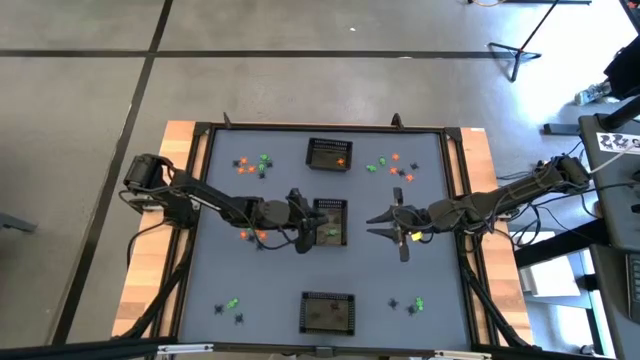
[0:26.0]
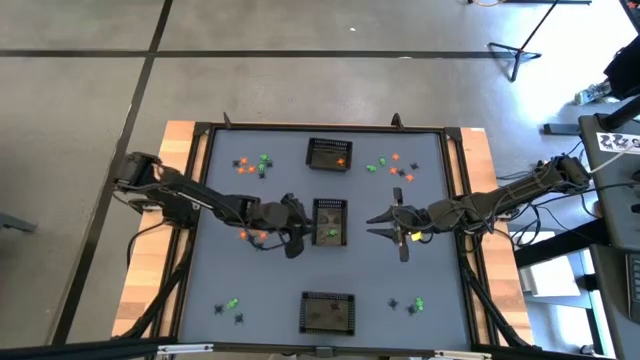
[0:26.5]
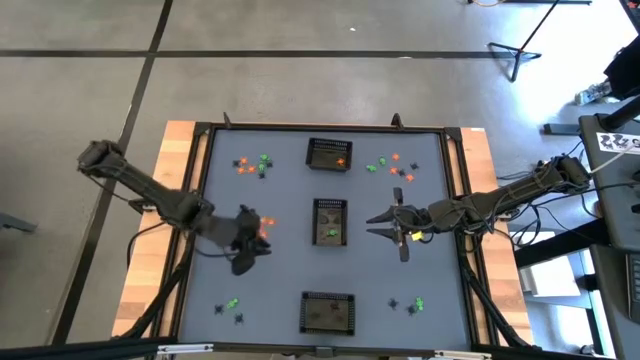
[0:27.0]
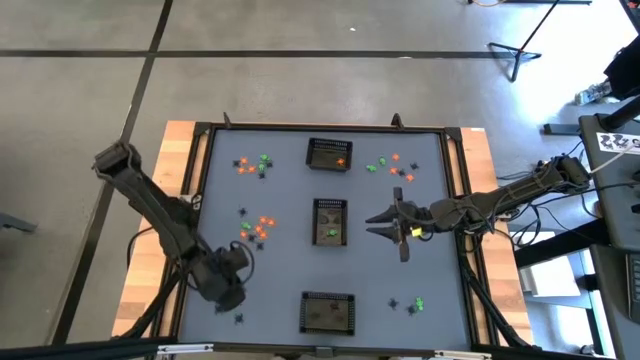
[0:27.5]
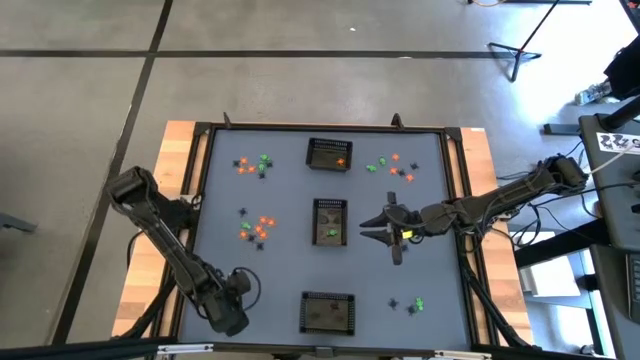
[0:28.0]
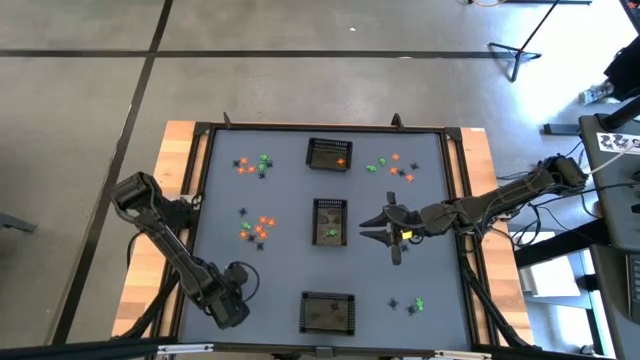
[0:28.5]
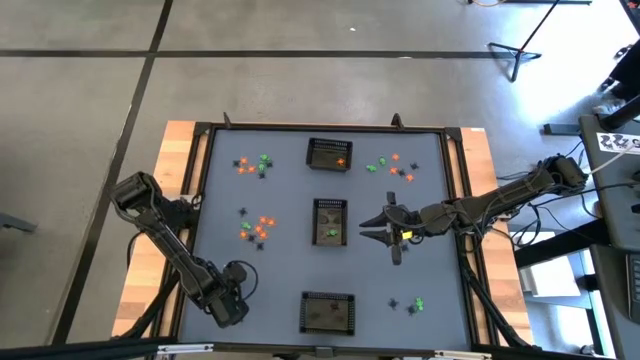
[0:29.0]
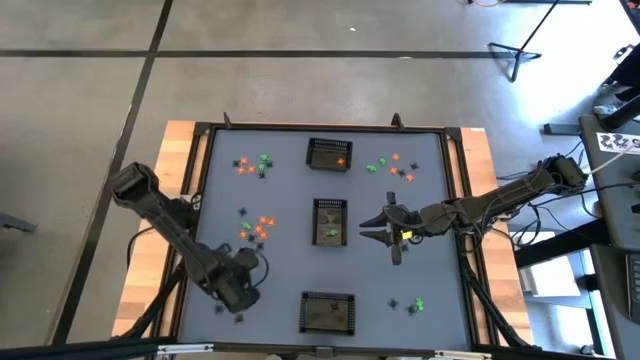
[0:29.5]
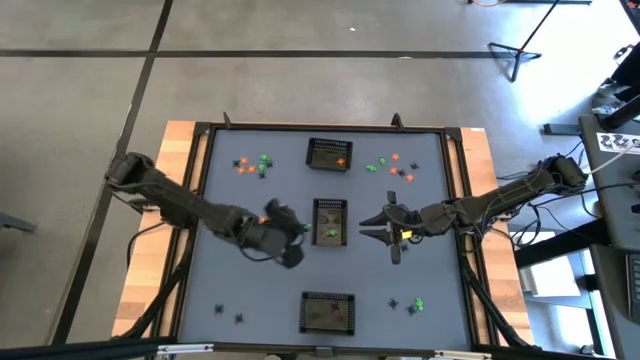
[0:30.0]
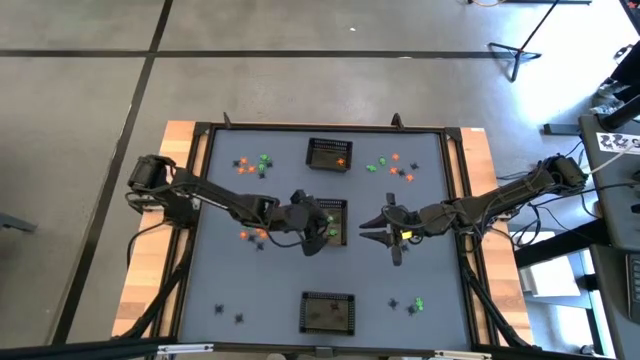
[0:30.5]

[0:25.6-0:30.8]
Task: Sort Halloween decoration
Put the green skeleton toy into the center black bin

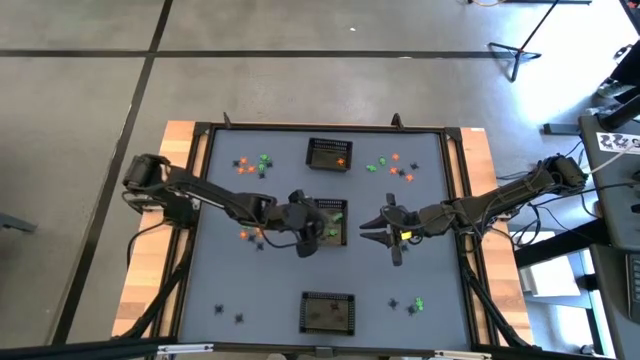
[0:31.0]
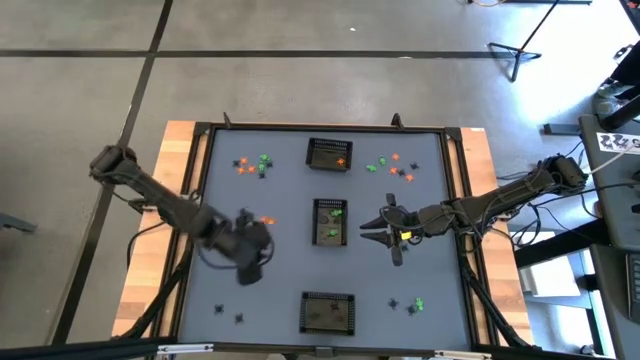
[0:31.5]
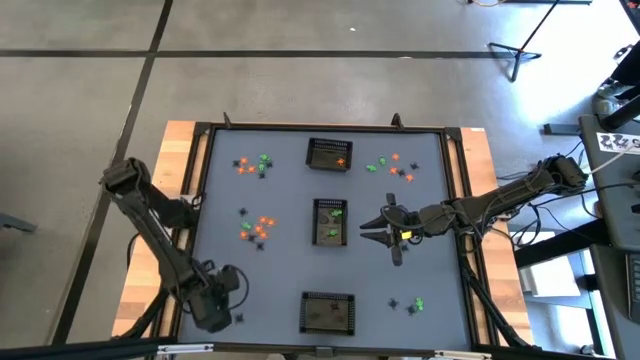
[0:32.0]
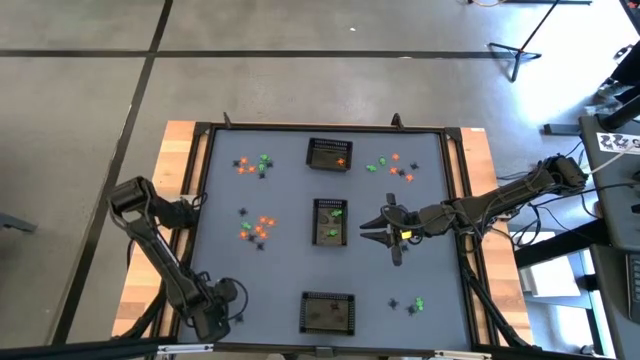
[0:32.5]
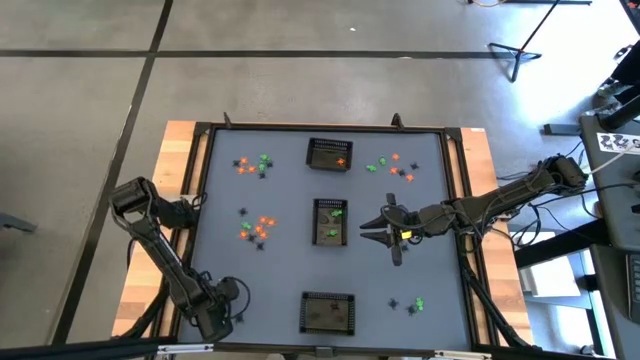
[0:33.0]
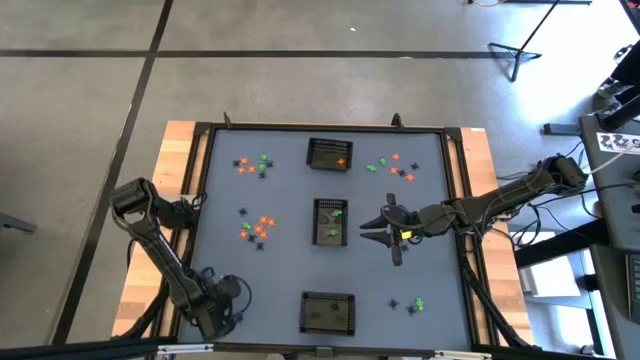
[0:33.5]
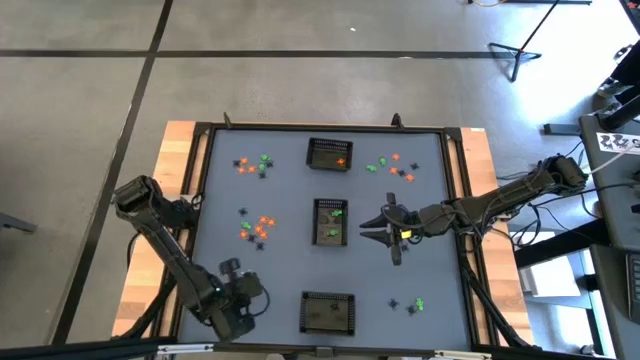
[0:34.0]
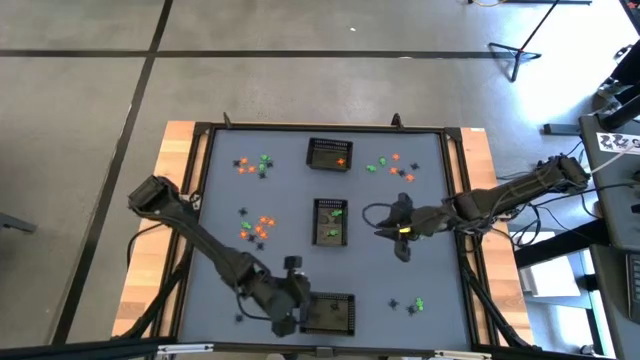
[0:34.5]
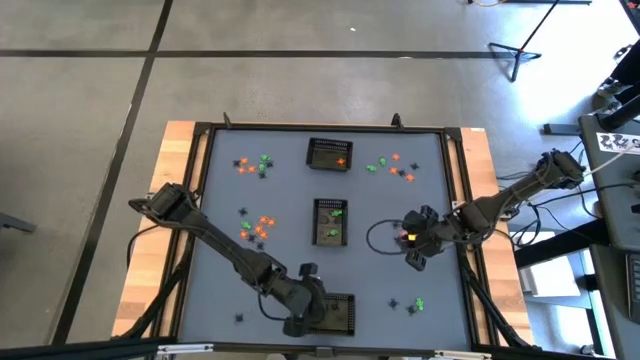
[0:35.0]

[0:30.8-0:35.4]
Put the black spider toy into the bottom black bin

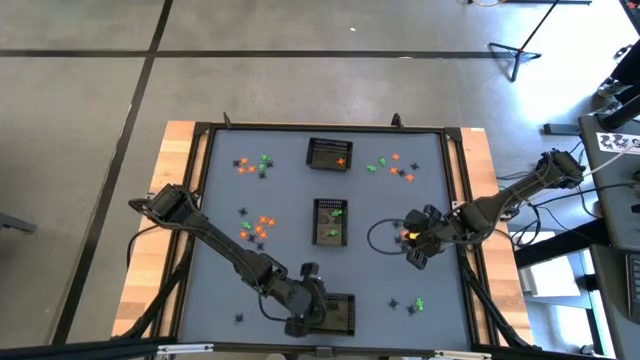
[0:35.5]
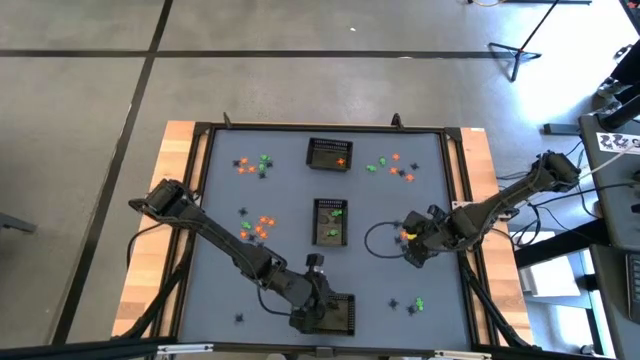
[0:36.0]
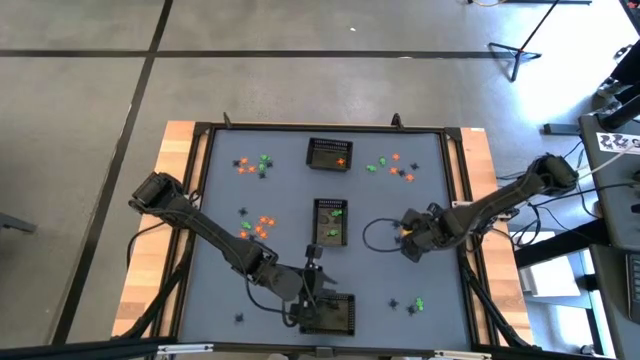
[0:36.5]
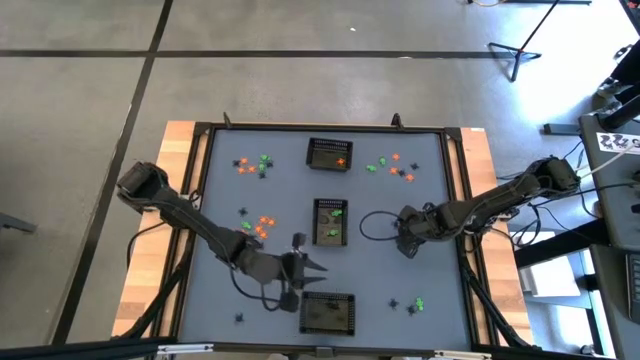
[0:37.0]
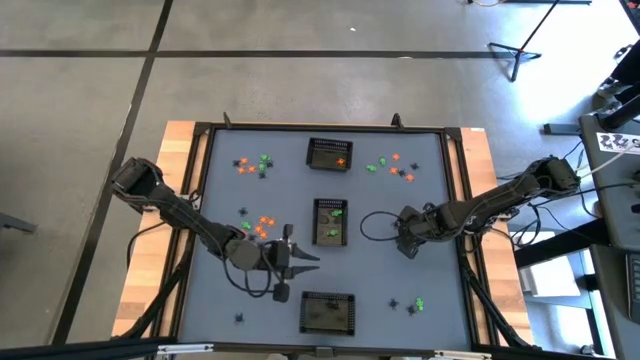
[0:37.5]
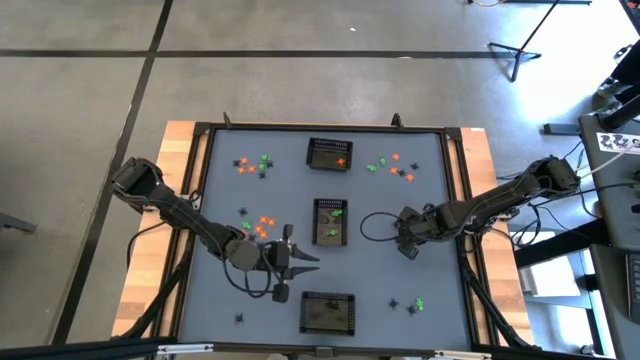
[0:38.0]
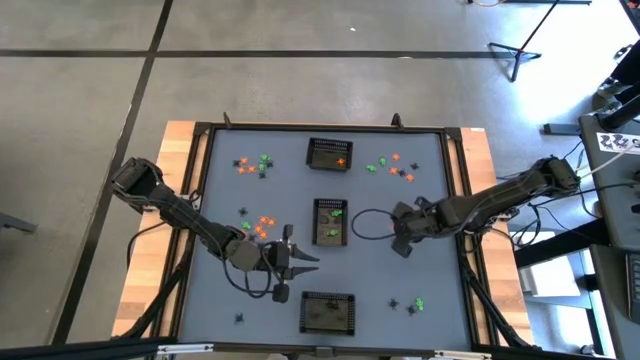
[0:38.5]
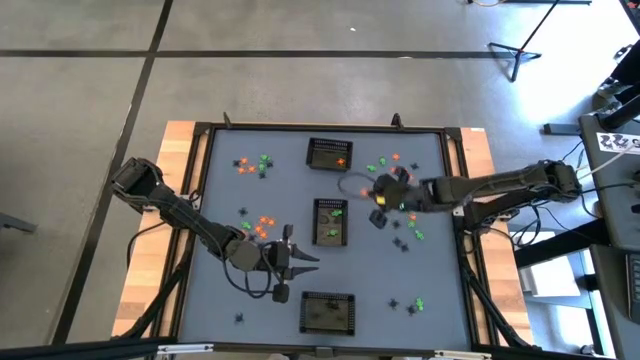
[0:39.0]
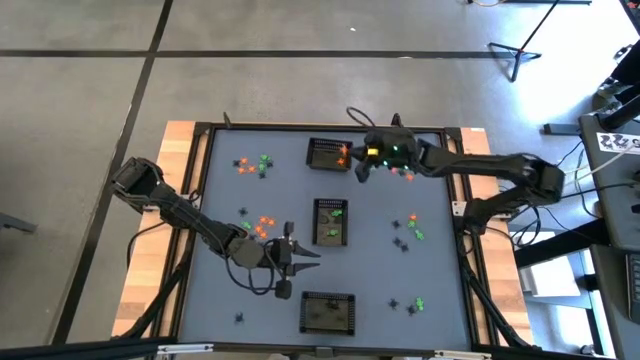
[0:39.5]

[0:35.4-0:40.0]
Put the orange spider toy into the top black bin

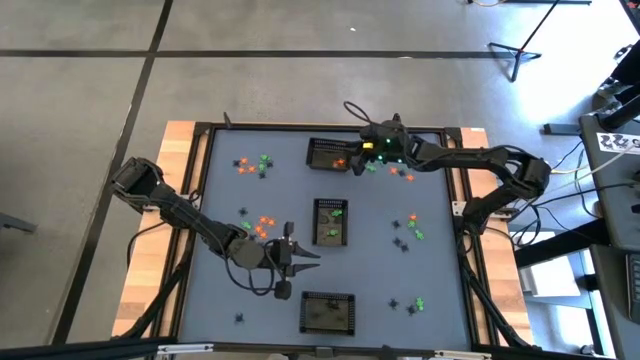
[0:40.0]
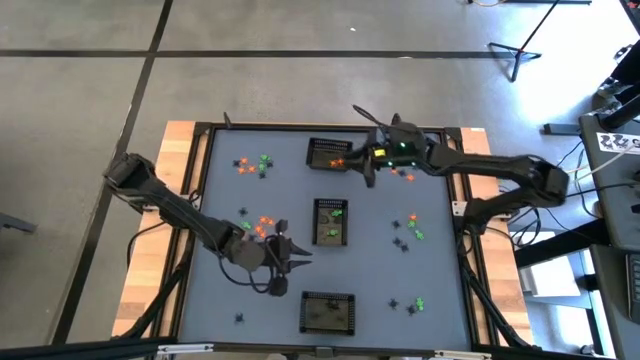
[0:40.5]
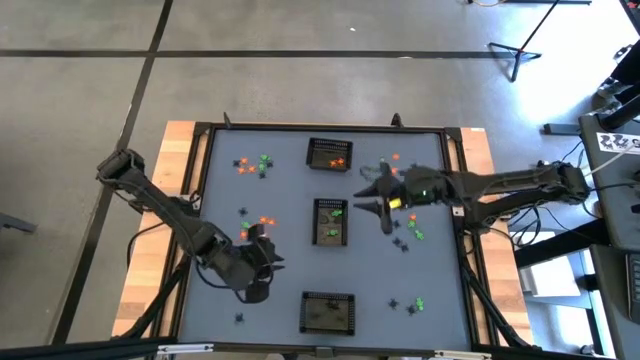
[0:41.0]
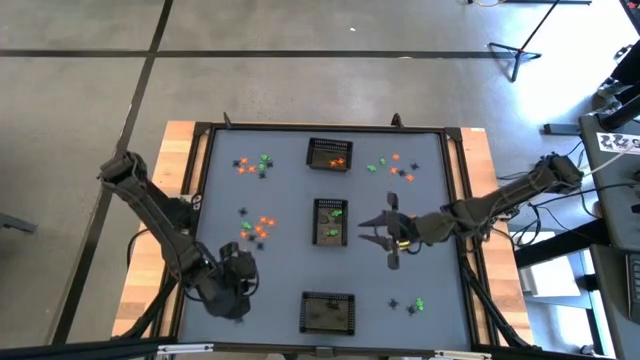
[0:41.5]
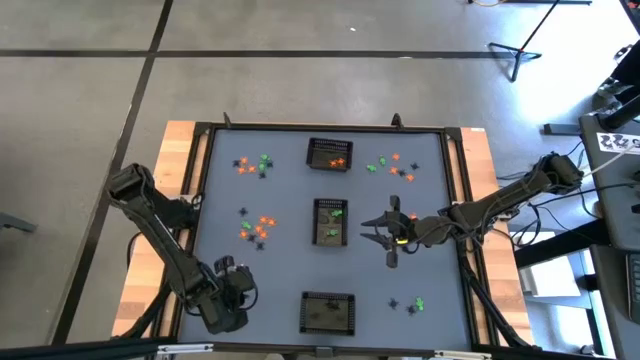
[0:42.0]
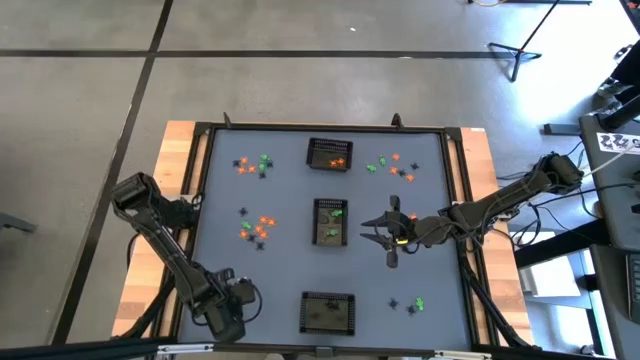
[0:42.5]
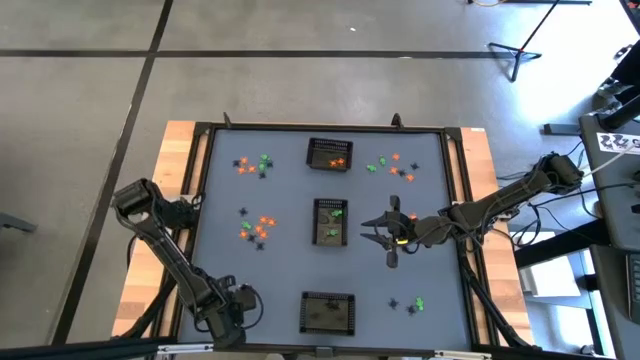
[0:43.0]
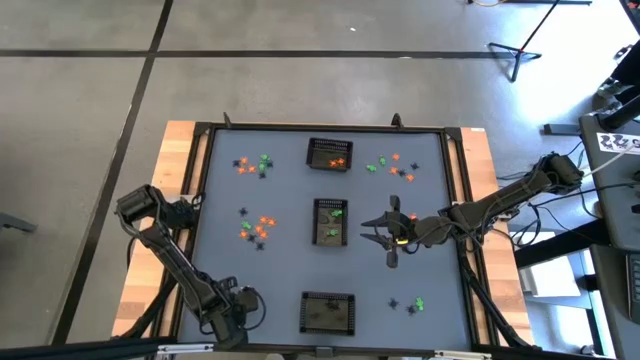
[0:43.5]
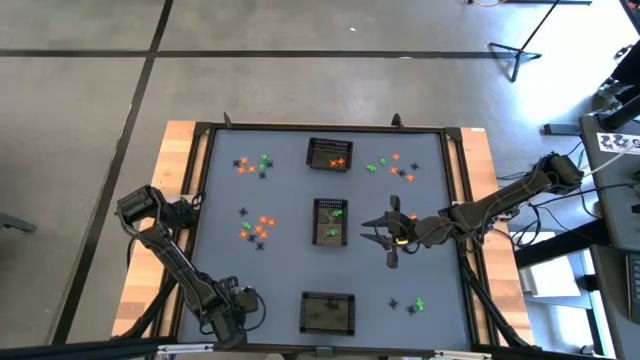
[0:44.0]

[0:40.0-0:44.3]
Put the black spider toy into the bottom black bin

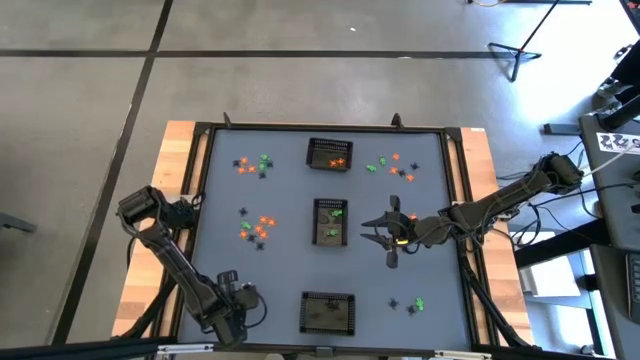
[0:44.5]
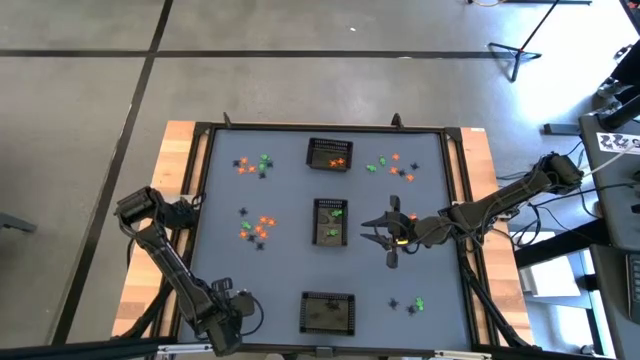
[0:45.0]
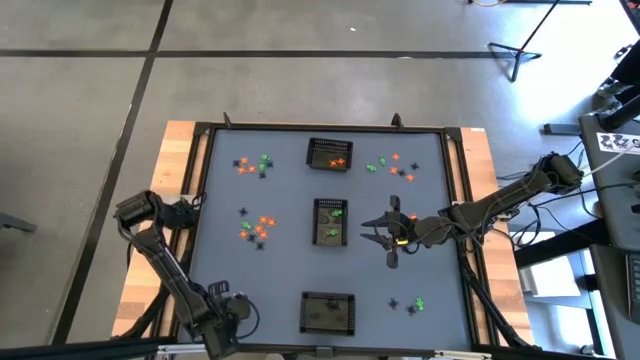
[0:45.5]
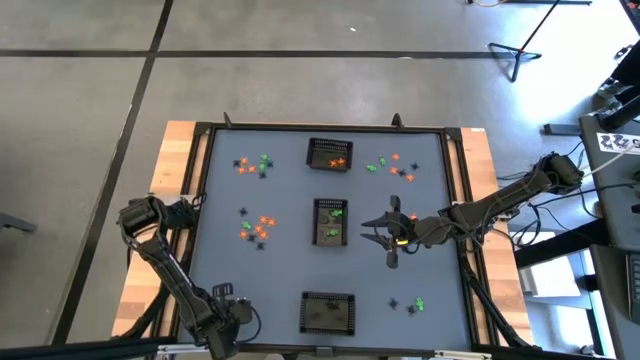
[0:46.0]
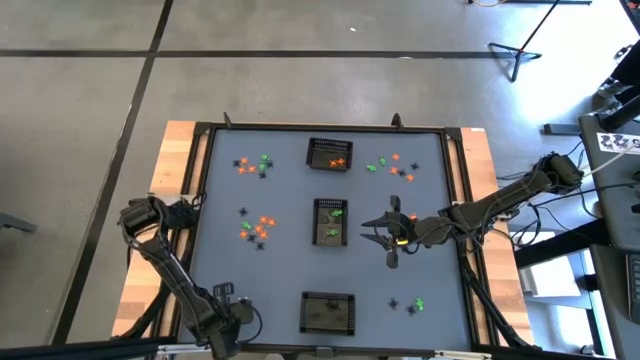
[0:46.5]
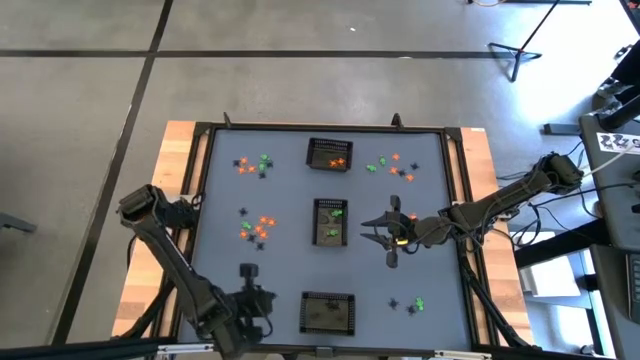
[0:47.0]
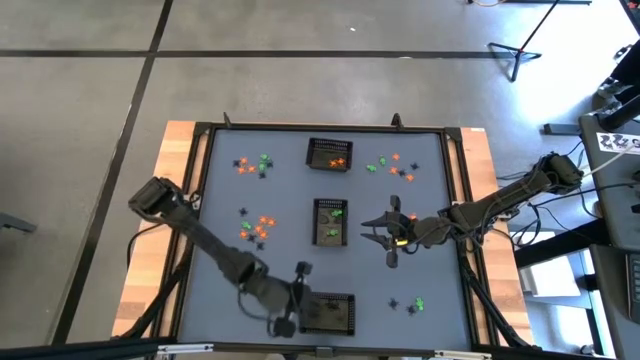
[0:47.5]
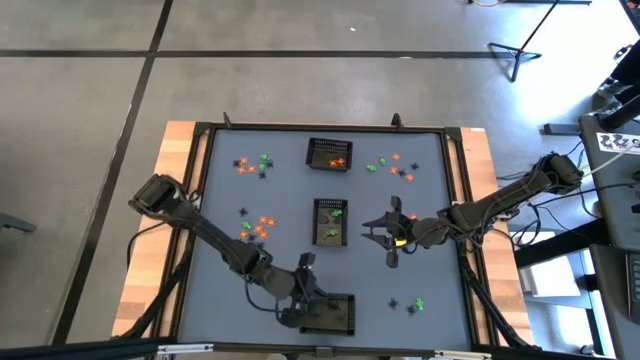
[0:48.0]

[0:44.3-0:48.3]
Put the black spider toy into the bottom black bin
